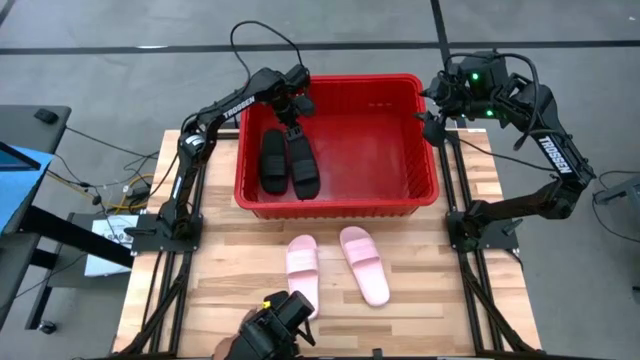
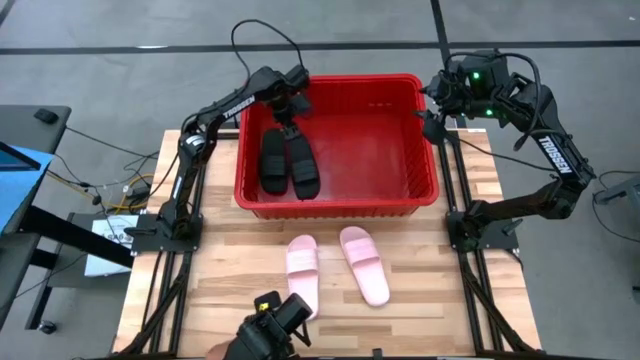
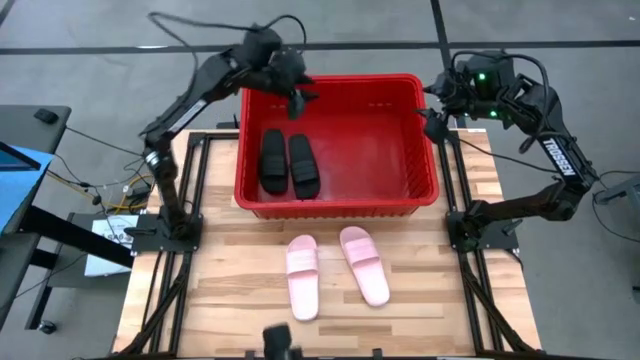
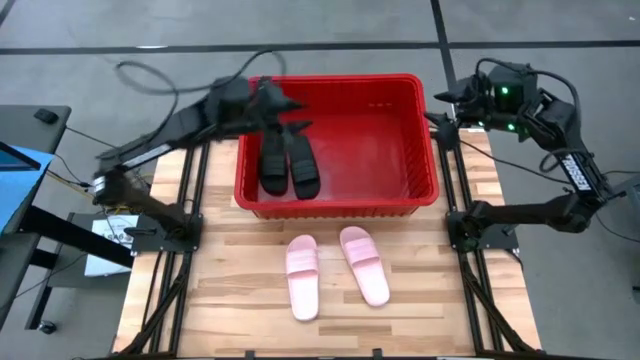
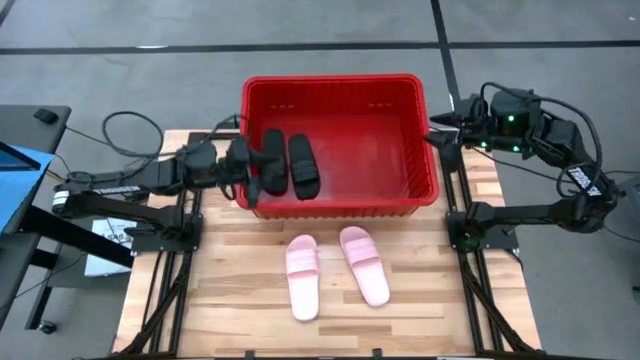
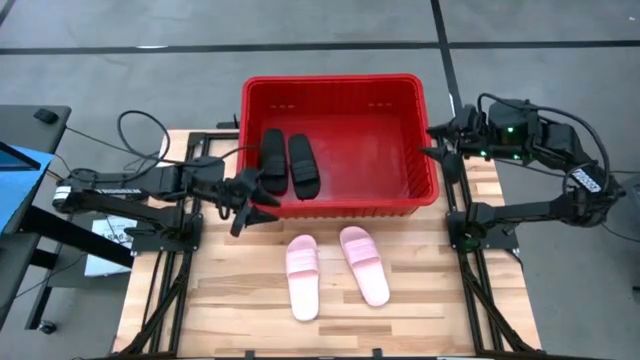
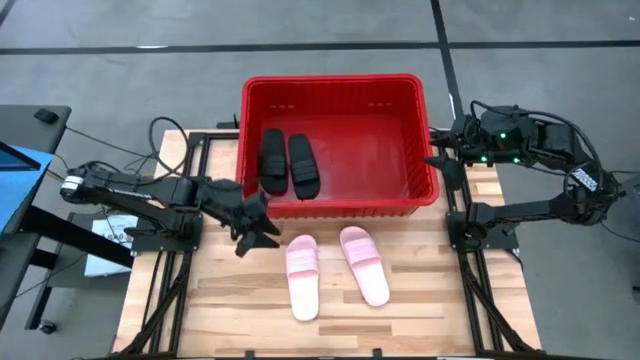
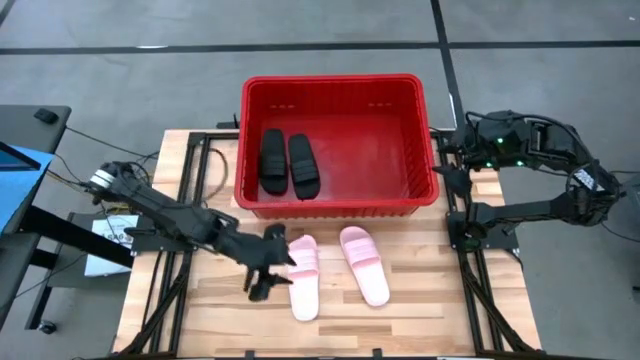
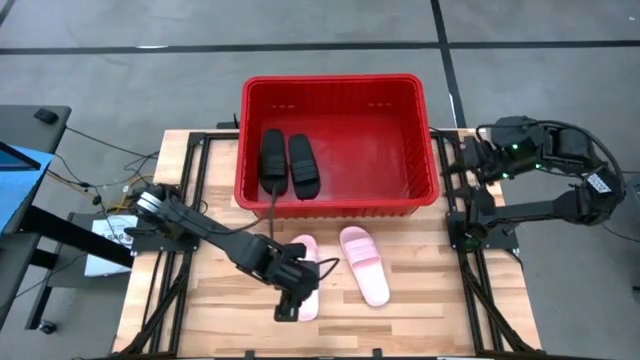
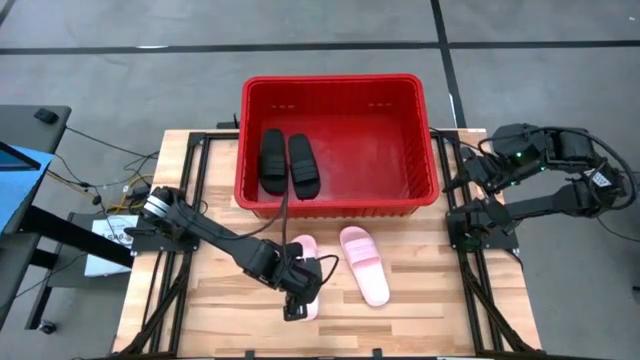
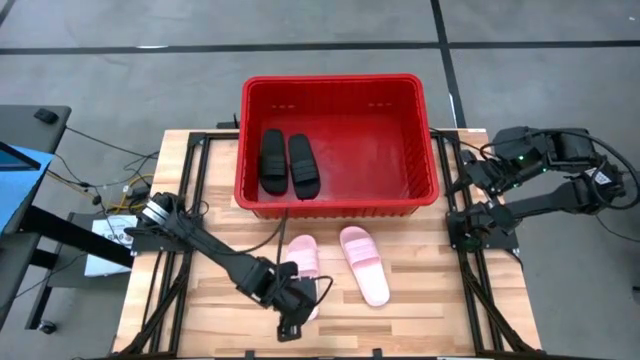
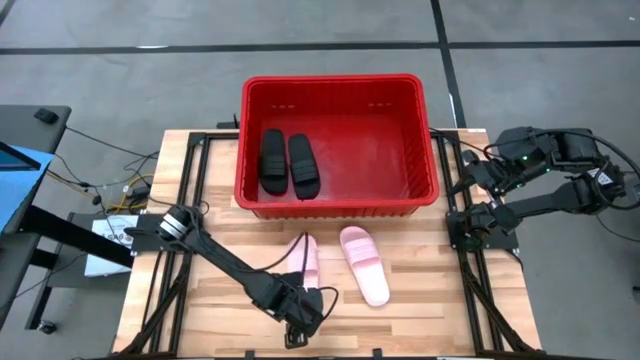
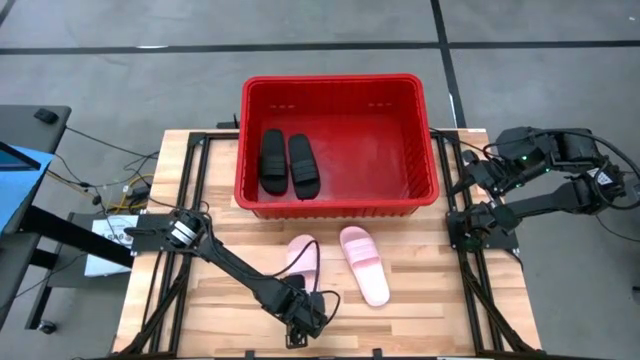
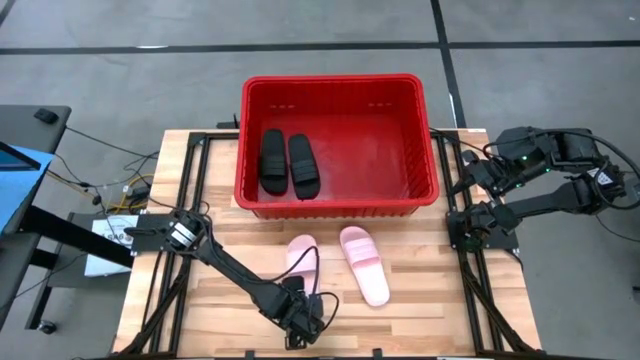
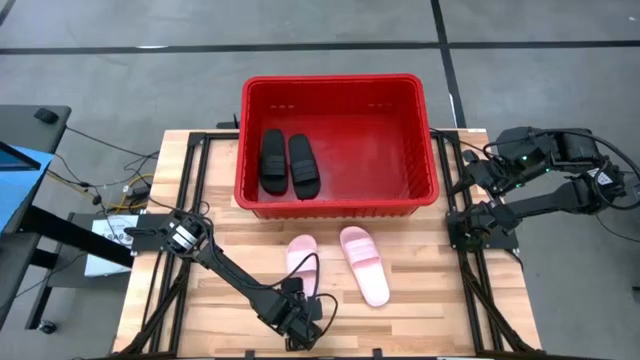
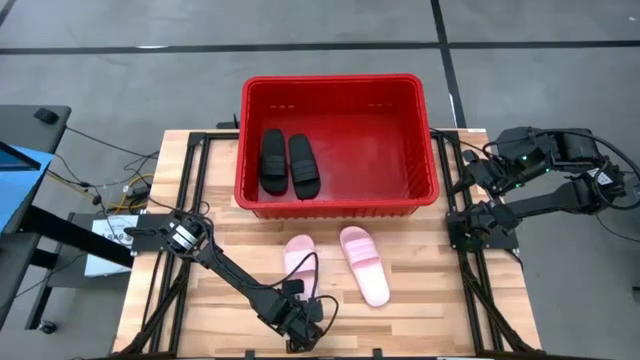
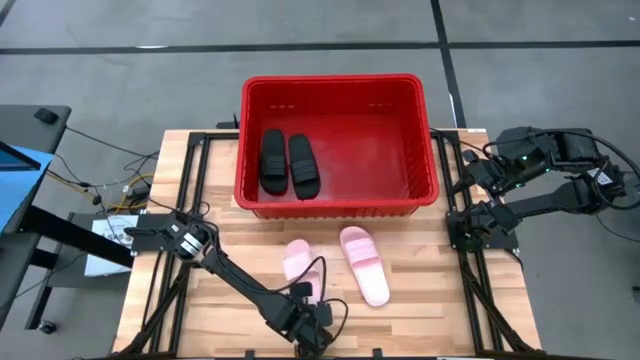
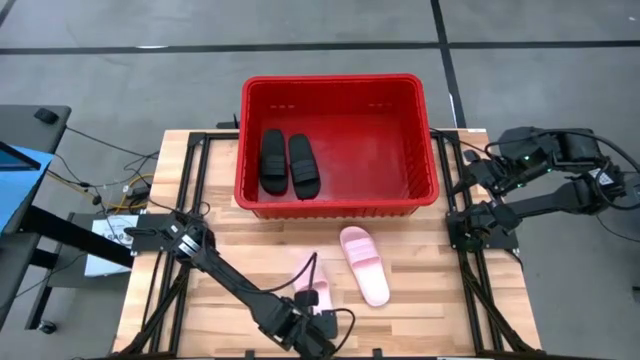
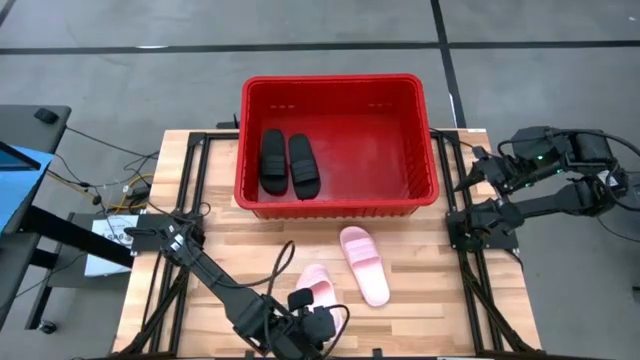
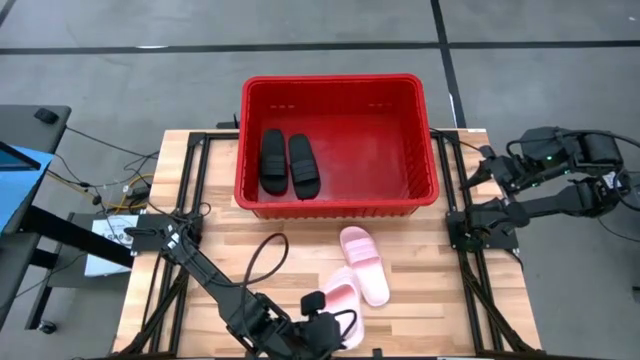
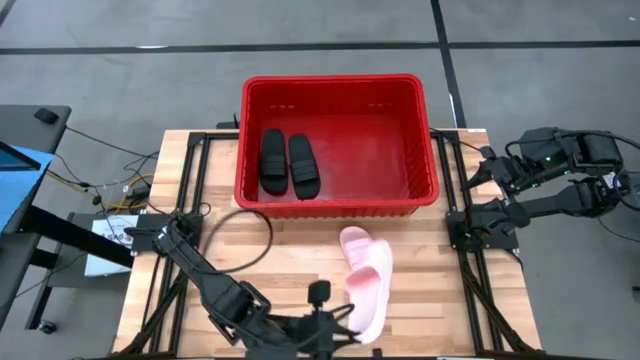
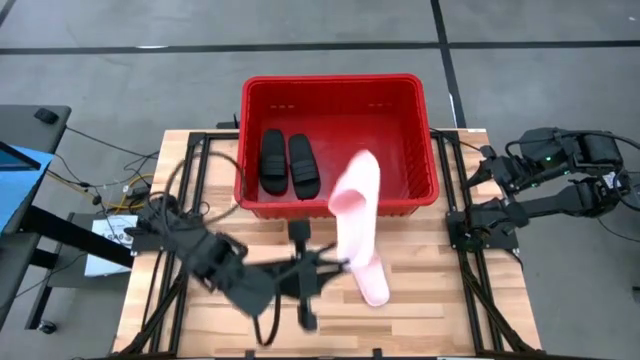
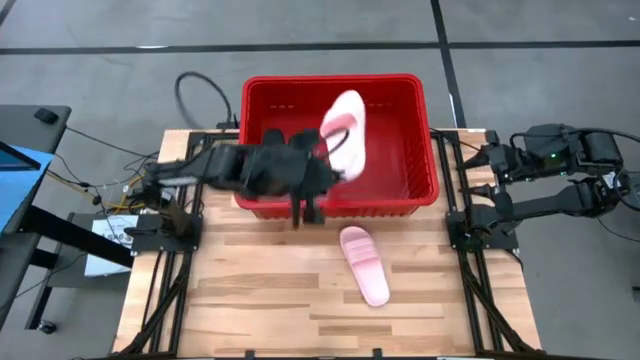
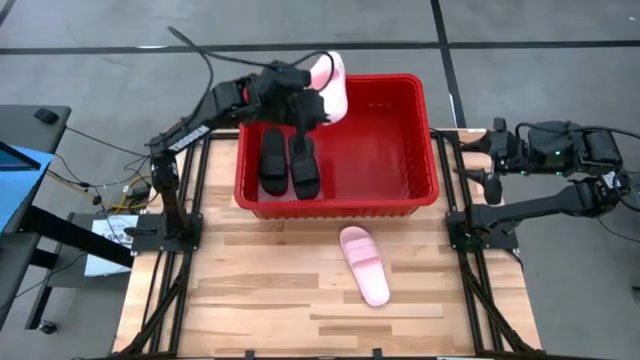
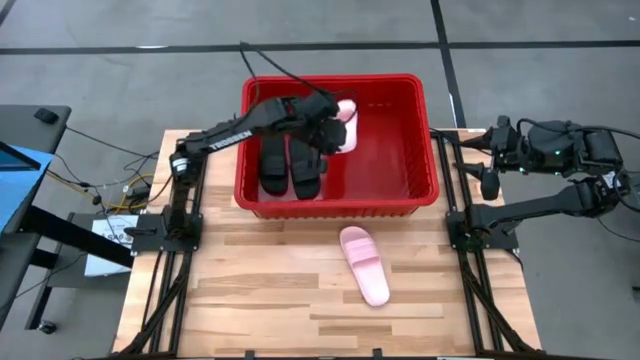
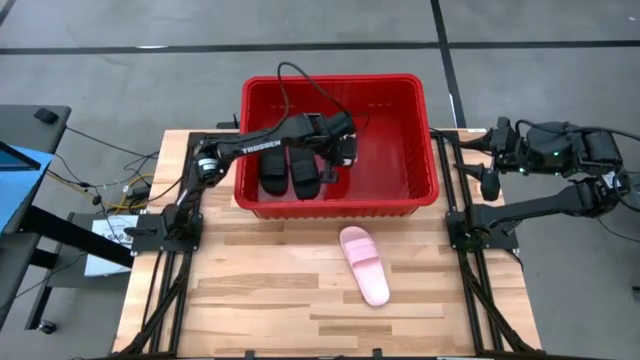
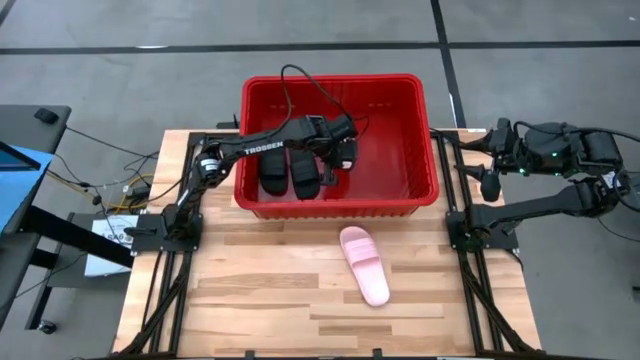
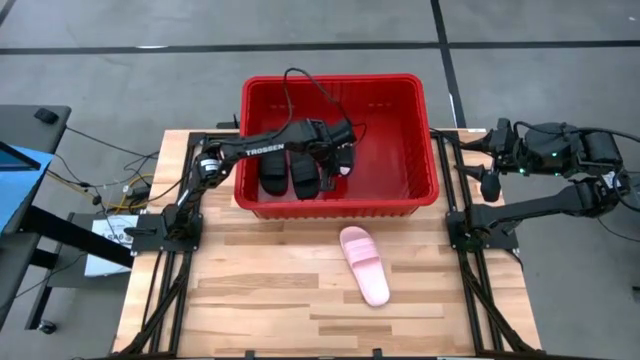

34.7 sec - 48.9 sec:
Task: Pick and place slides into bin
Put the left pink slide into the red bin

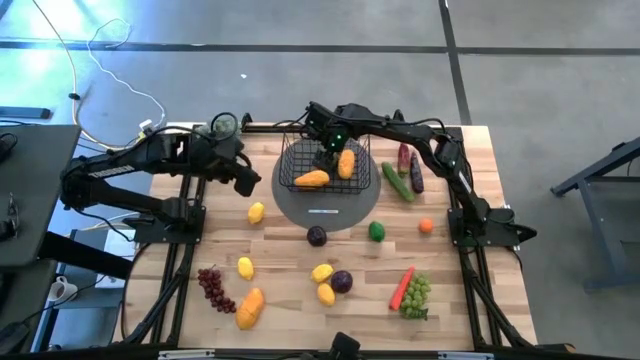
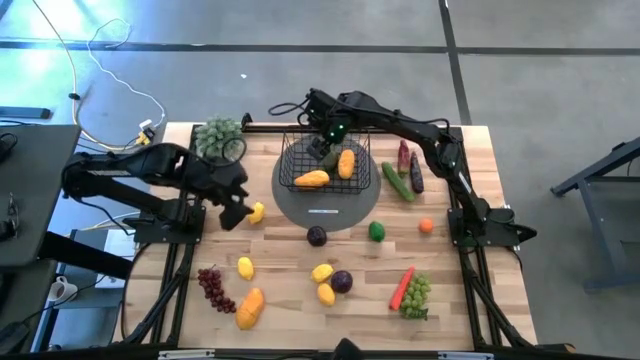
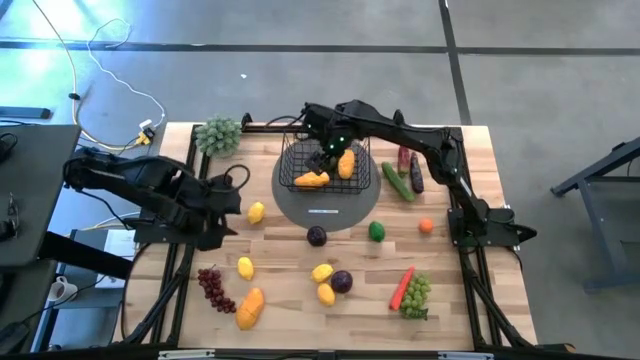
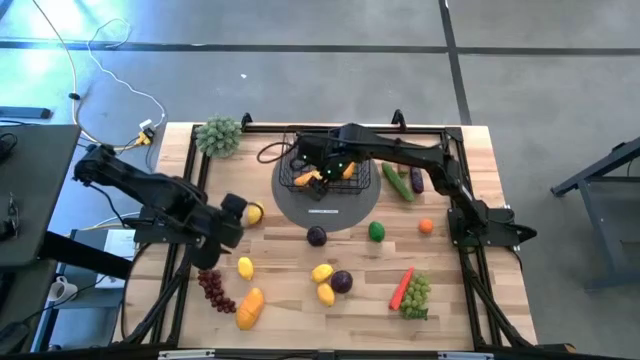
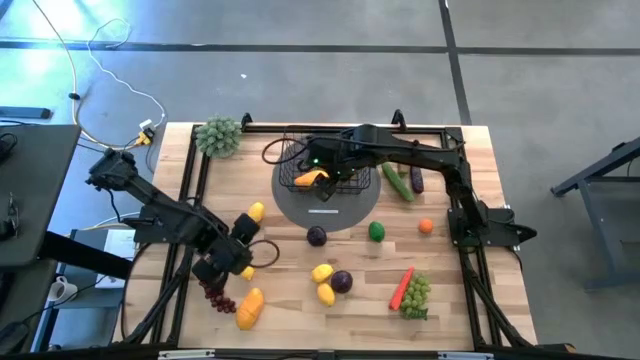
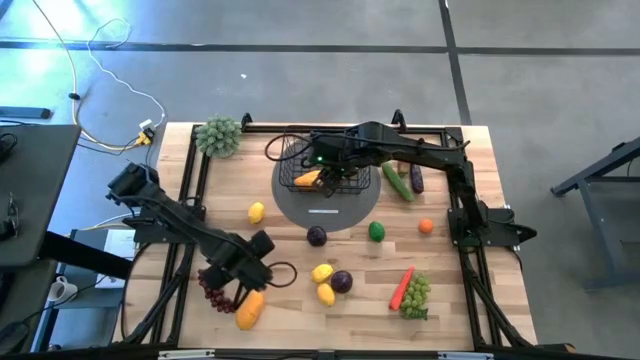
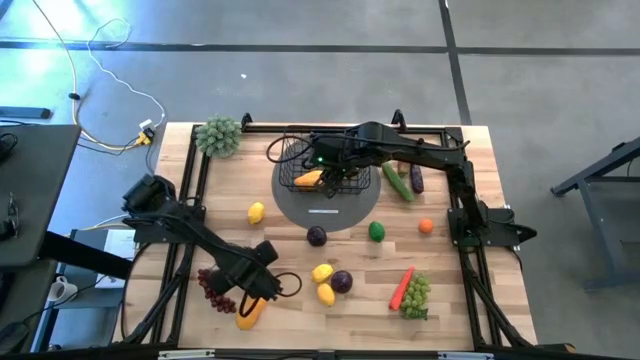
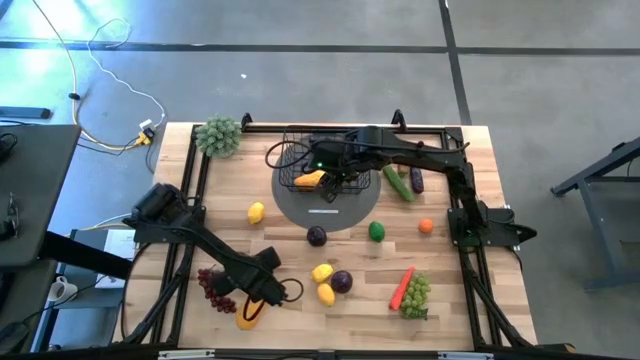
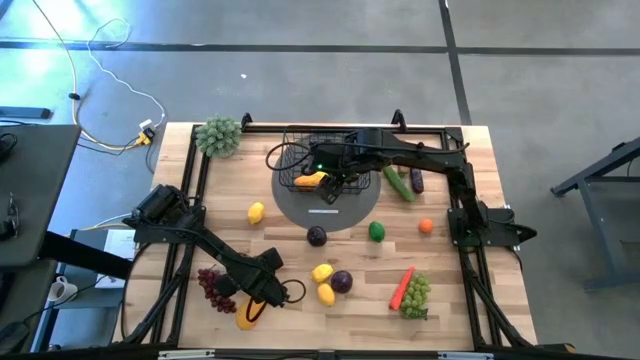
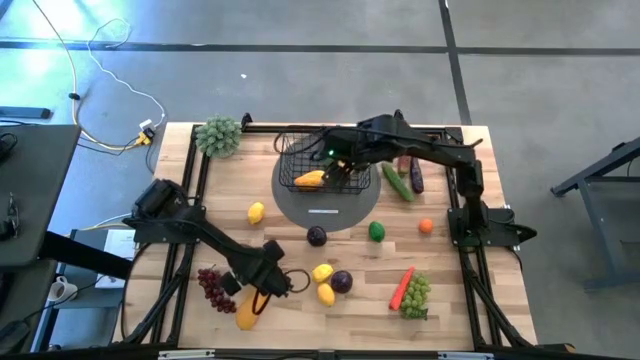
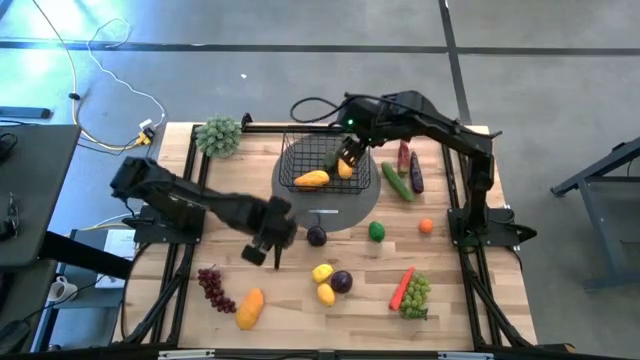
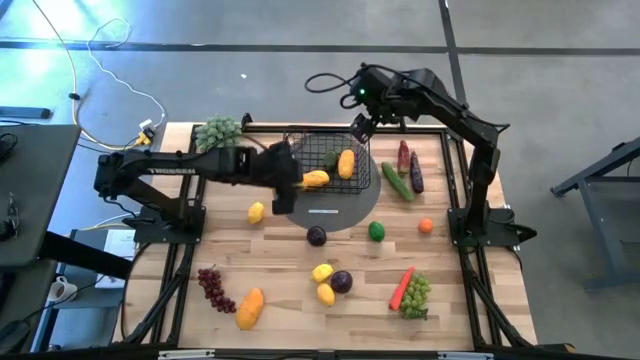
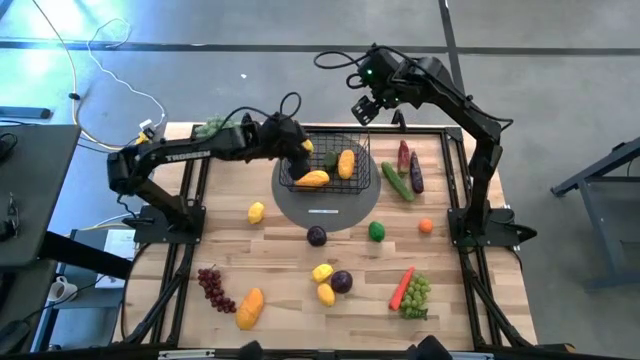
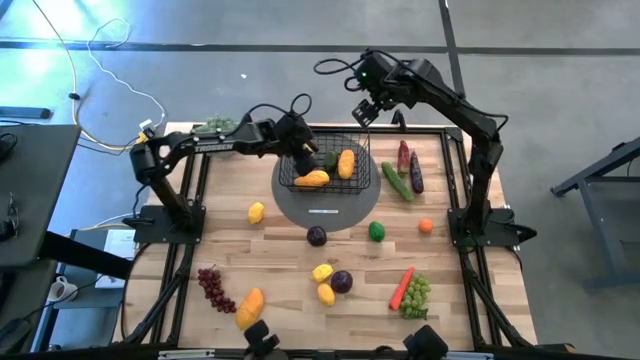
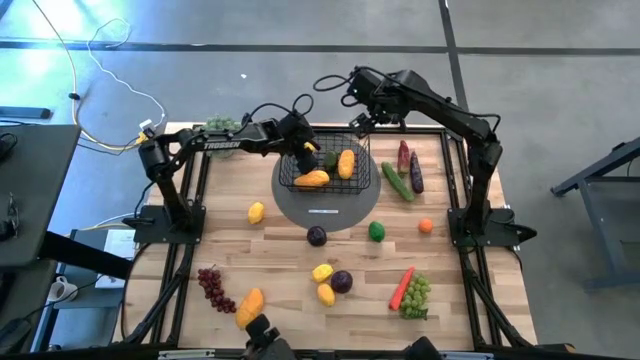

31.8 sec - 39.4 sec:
Task: Build produce basket
Put the yellow lemon into the wire basket
